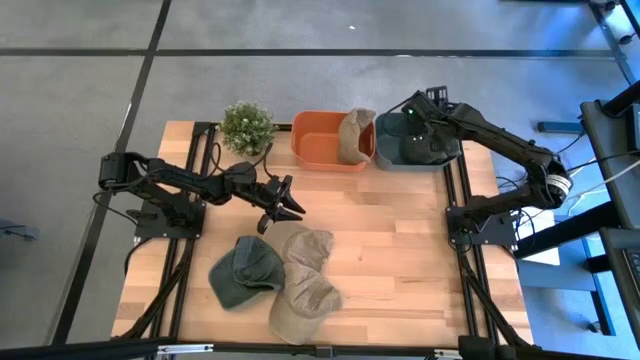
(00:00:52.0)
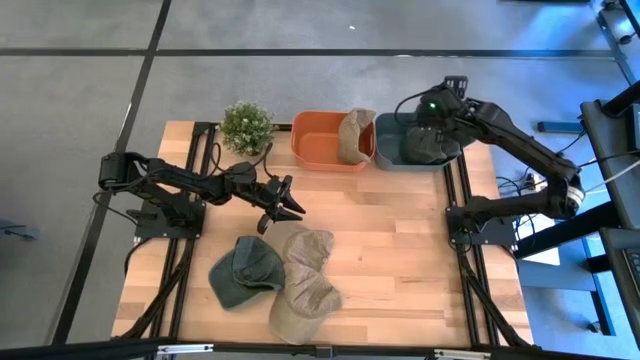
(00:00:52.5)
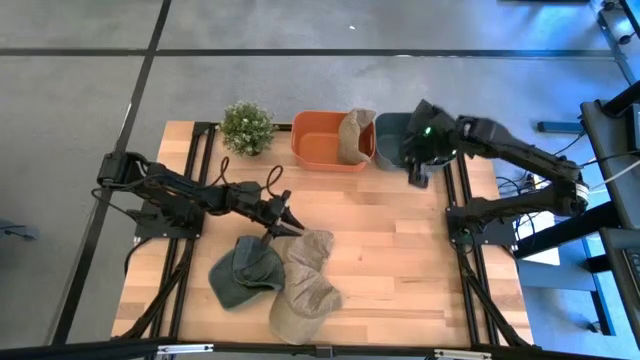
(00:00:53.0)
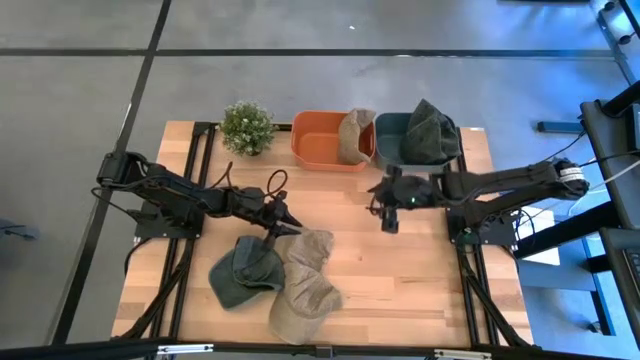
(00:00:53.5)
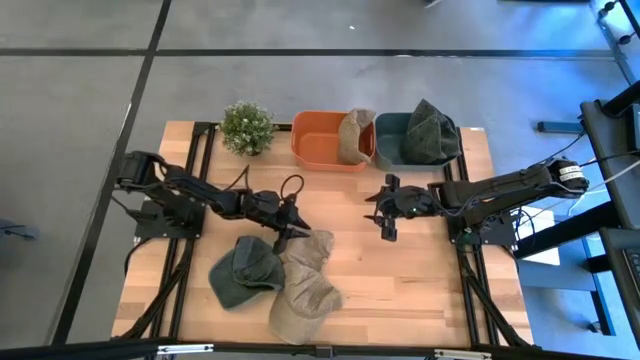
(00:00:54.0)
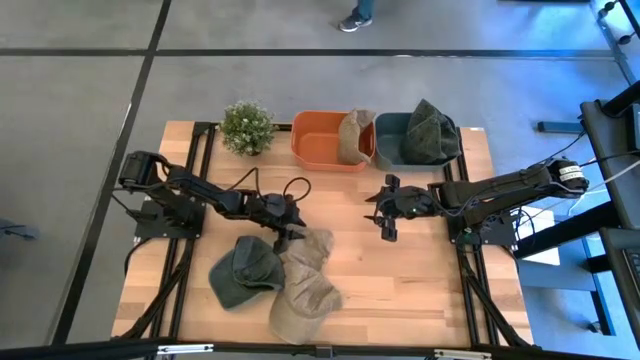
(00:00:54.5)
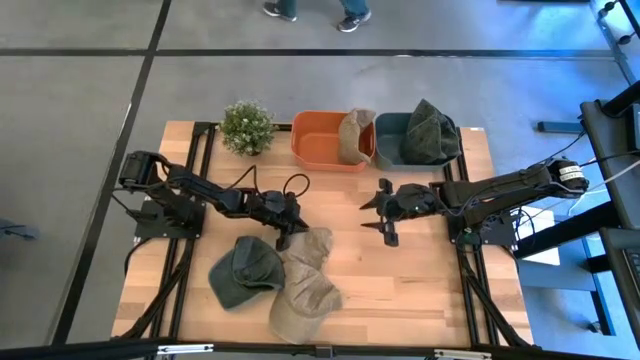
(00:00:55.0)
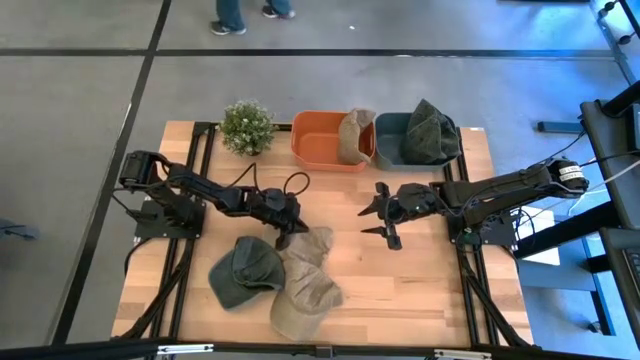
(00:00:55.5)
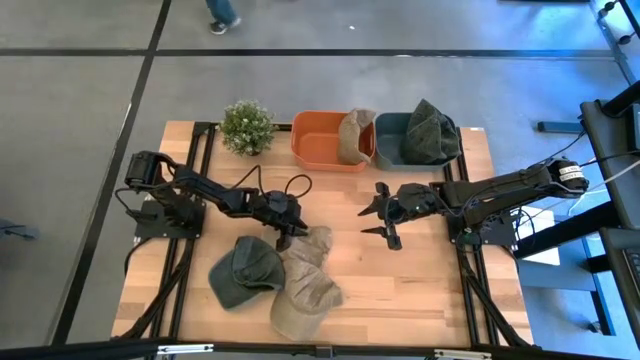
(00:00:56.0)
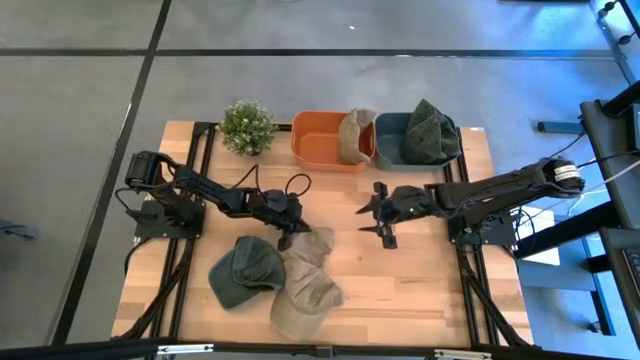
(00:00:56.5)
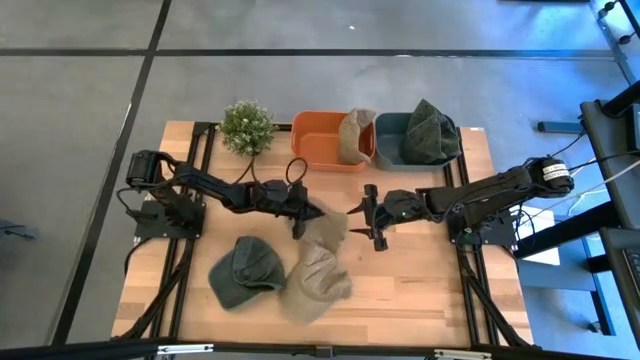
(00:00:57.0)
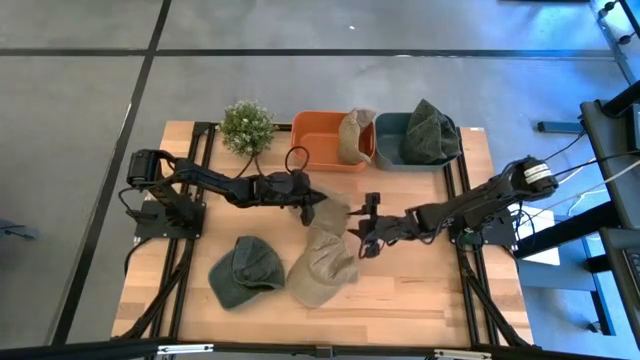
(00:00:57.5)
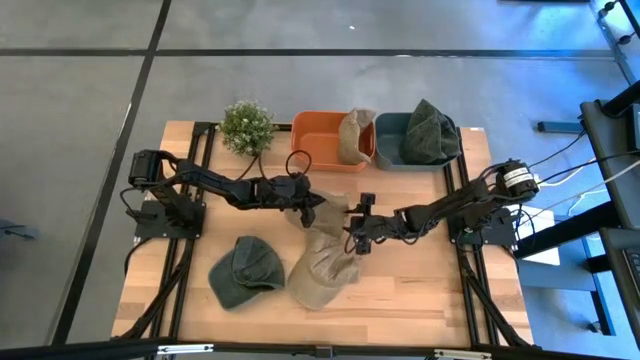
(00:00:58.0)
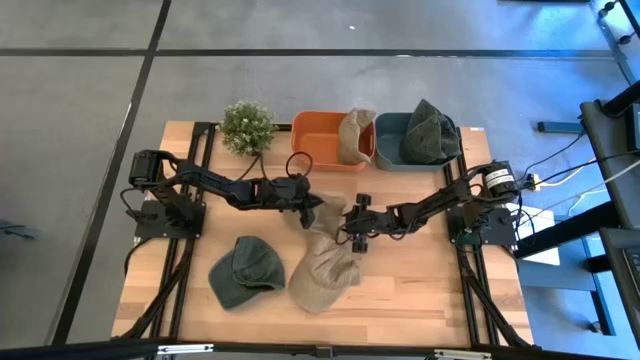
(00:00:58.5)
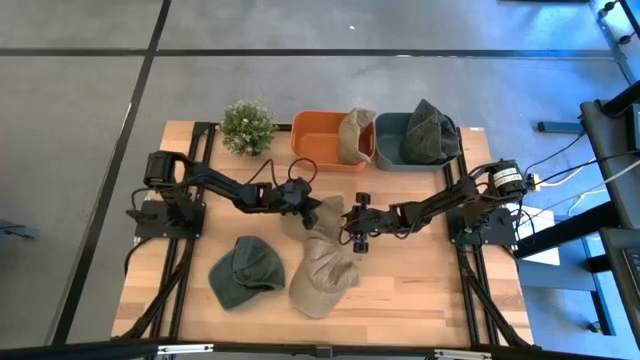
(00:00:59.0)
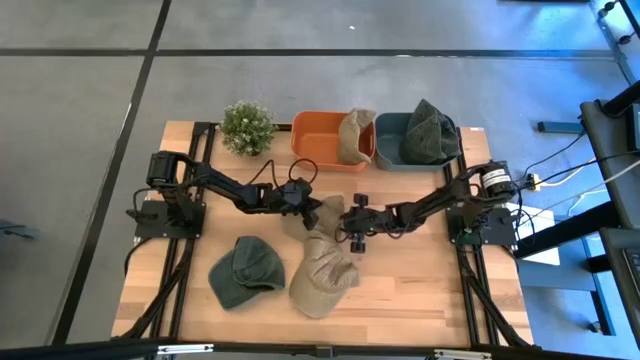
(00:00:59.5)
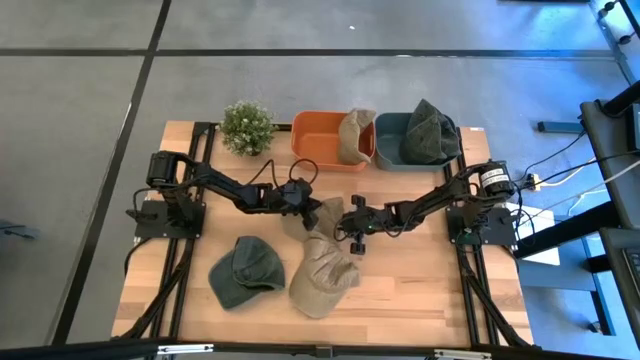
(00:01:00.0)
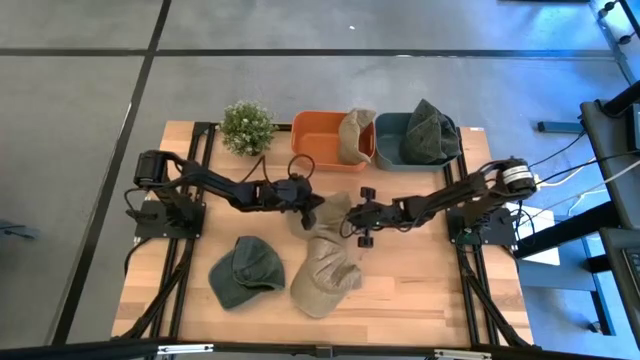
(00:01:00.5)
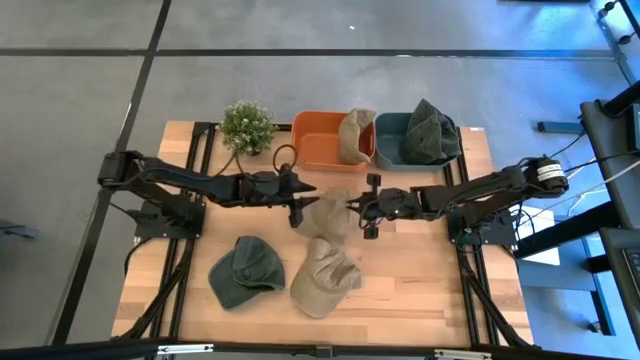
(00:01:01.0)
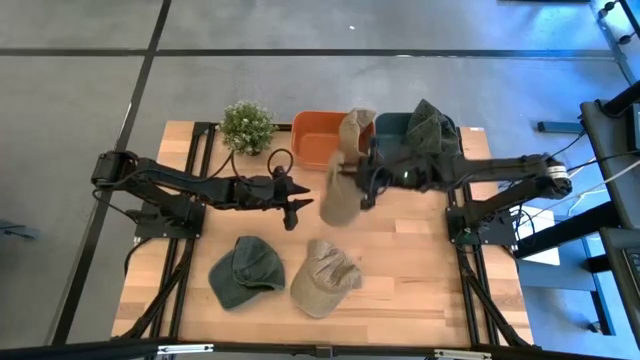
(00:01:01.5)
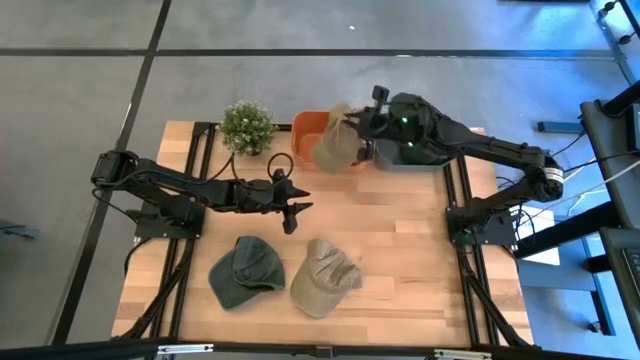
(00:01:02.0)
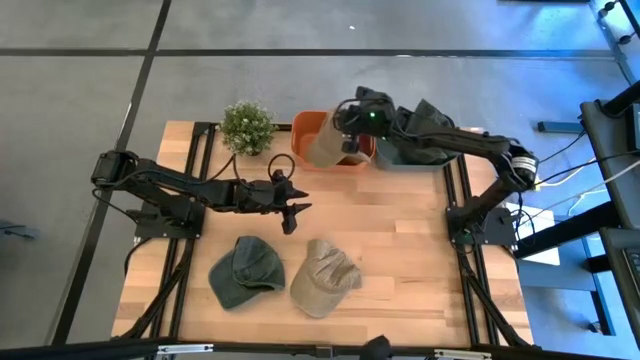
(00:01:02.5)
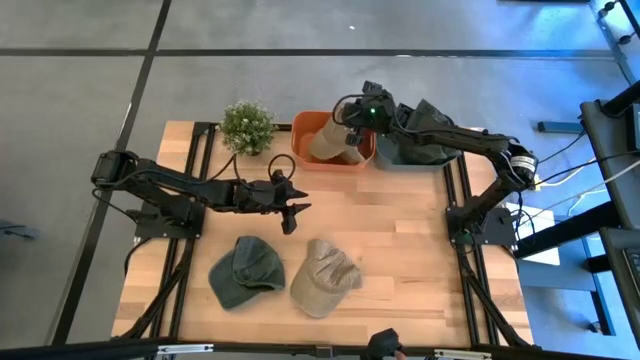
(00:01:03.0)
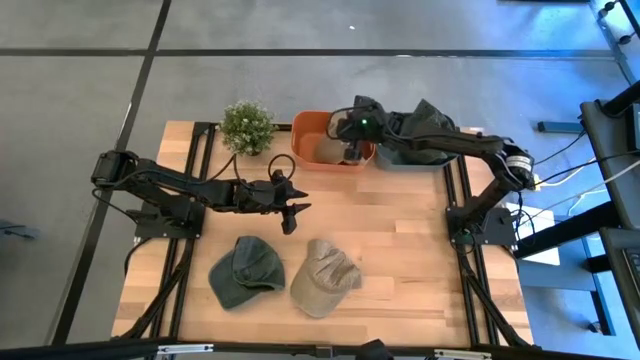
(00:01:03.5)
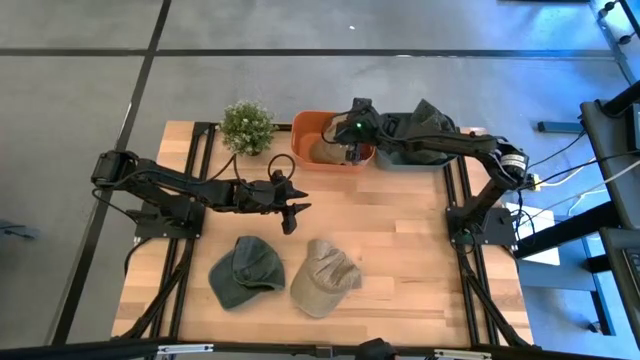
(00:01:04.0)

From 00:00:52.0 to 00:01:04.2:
Task: Pick & Place hat
Put the top brown cap into the orange bin

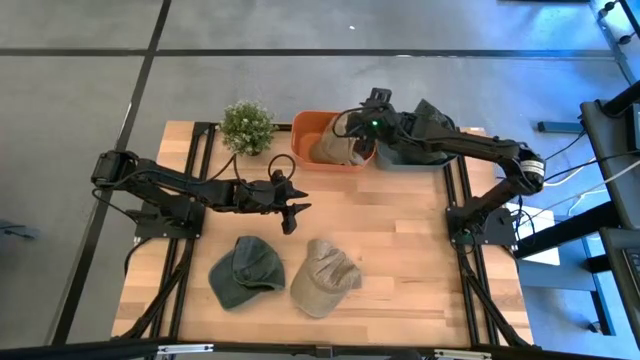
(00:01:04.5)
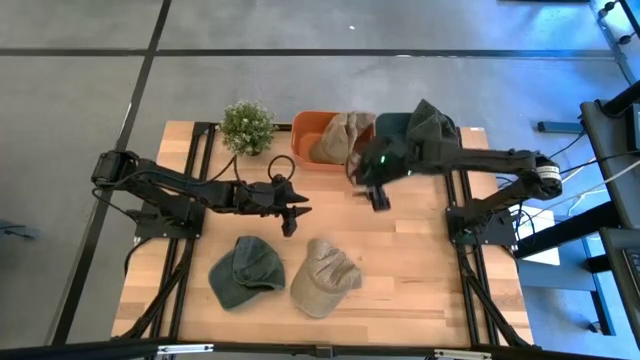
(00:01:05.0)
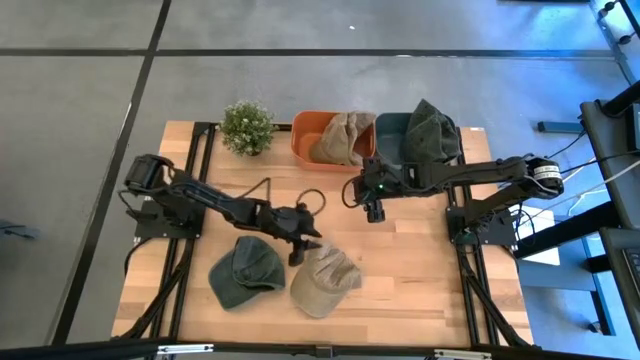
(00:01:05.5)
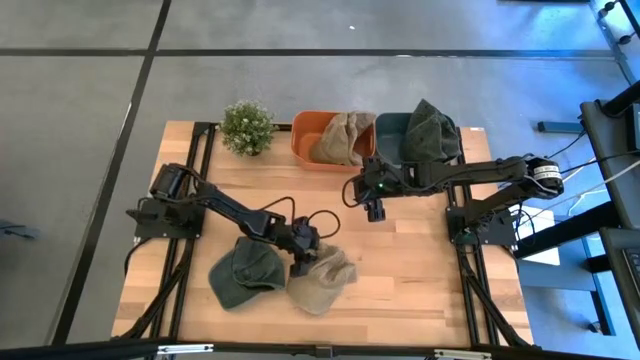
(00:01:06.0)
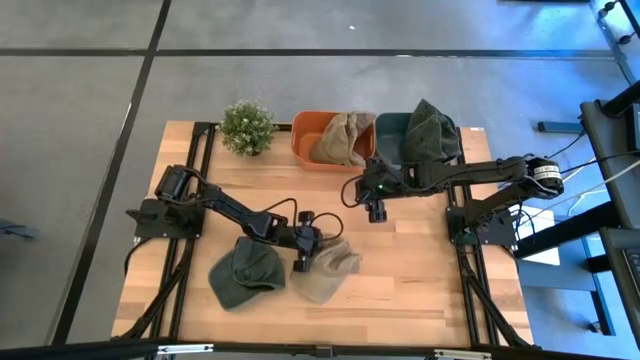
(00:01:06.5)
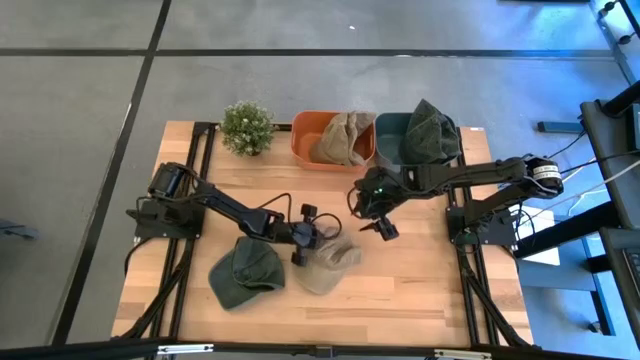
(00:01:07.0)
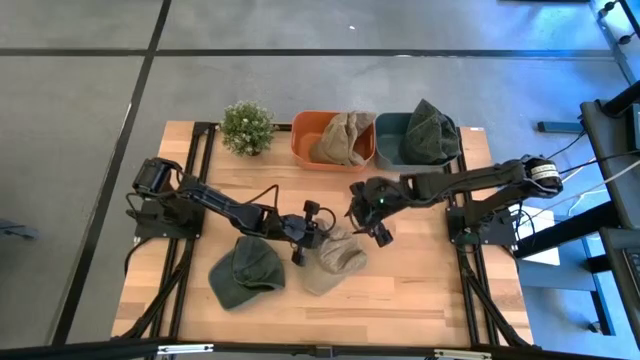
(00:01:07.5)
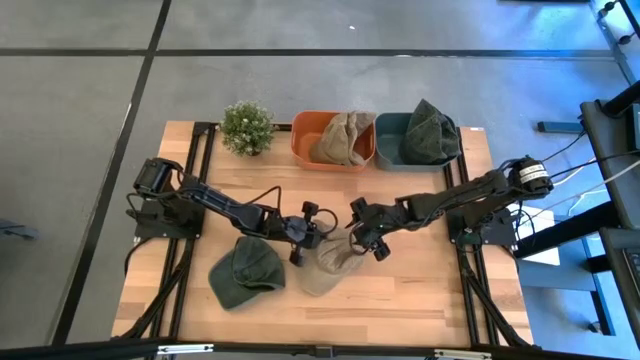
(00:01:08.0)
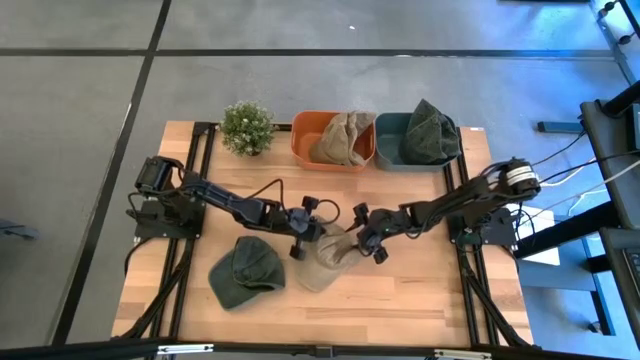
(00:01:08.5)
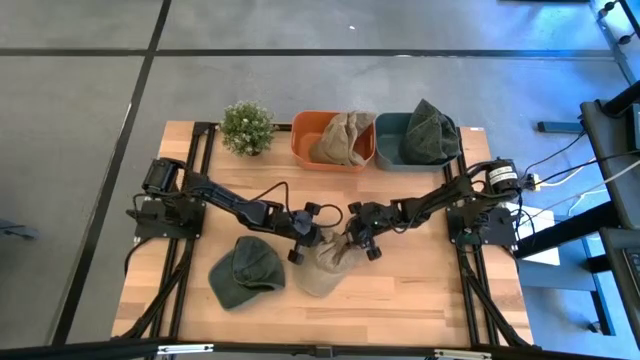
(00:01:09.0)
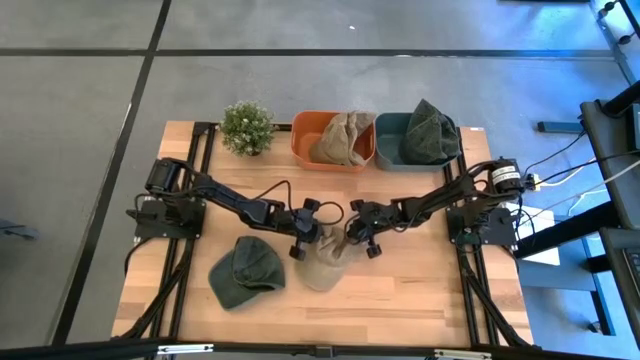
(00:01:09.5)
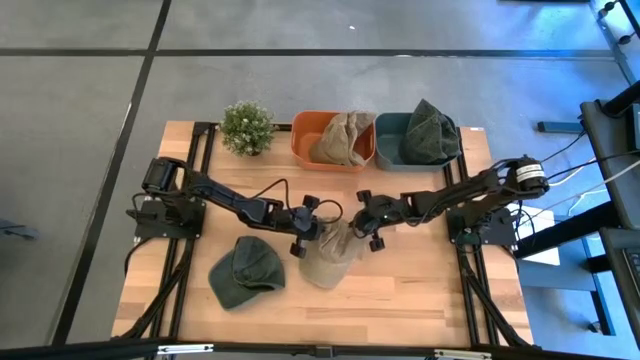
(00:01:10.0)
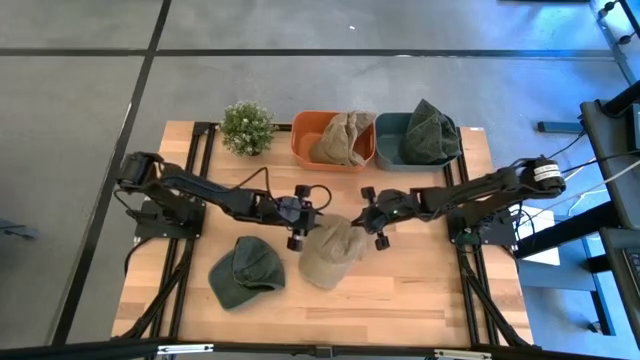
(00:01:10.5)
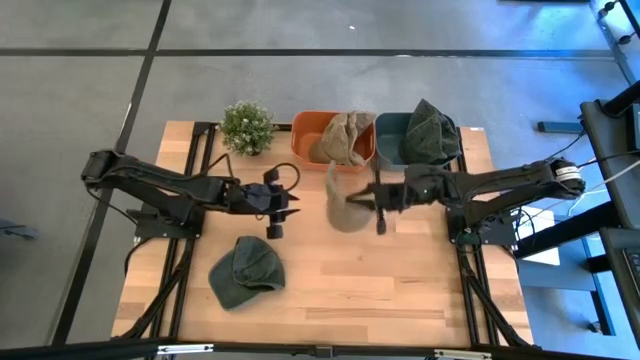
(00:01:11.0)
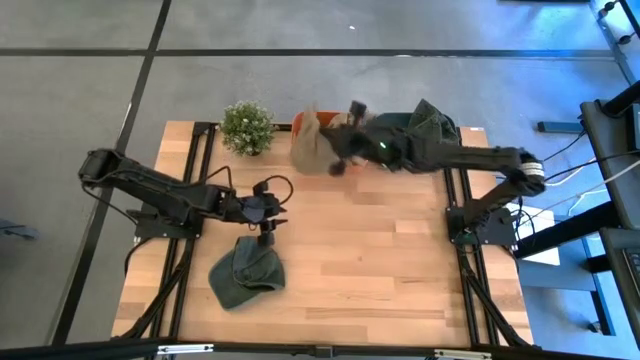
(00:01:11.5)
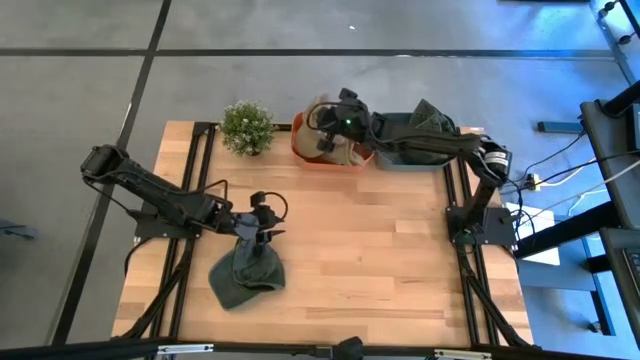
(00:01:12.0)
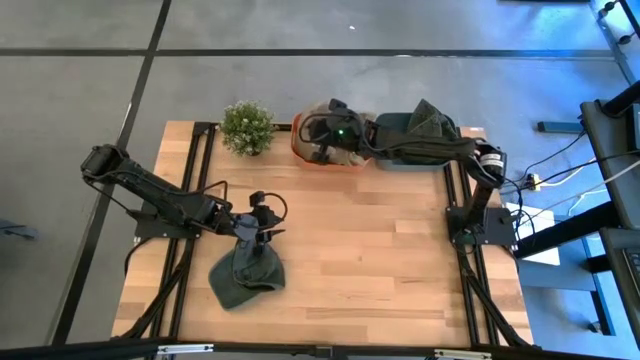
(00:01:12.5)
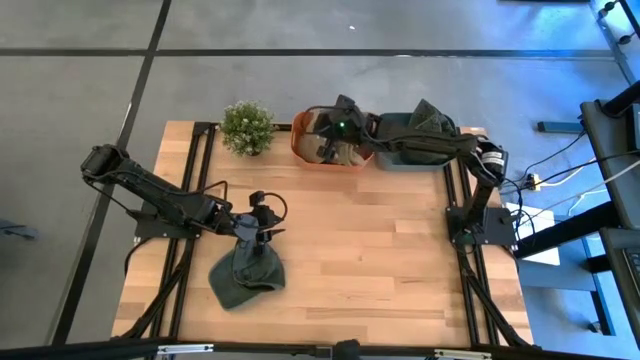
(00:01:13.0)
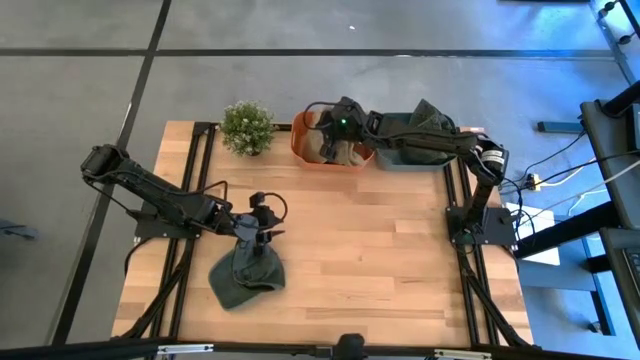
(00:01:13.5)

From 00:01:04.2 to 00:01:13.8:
Put the brown cap into the orange bin
